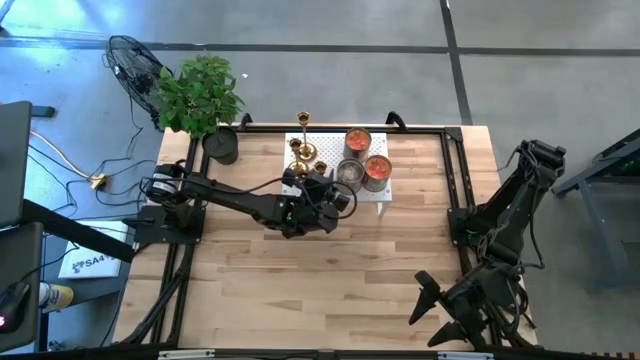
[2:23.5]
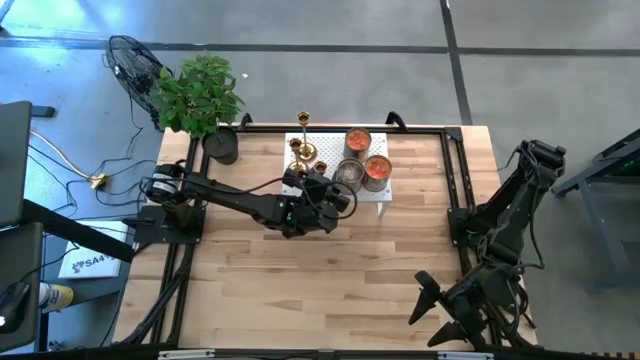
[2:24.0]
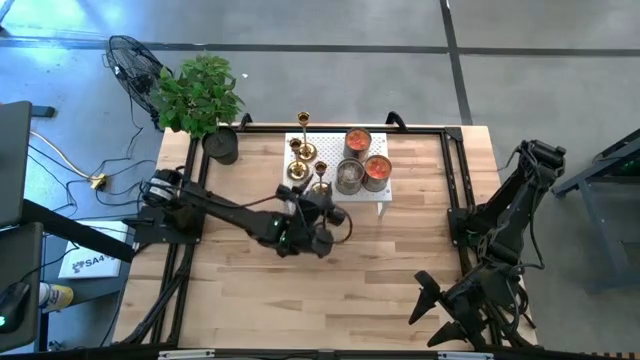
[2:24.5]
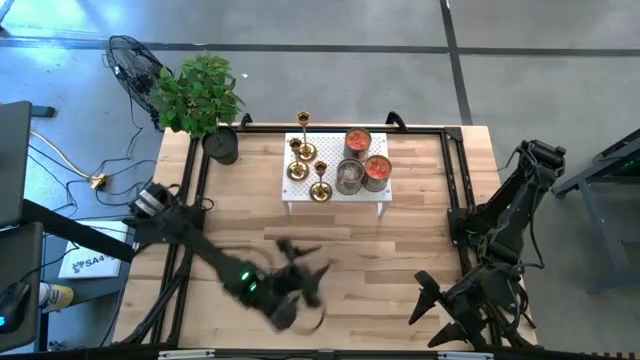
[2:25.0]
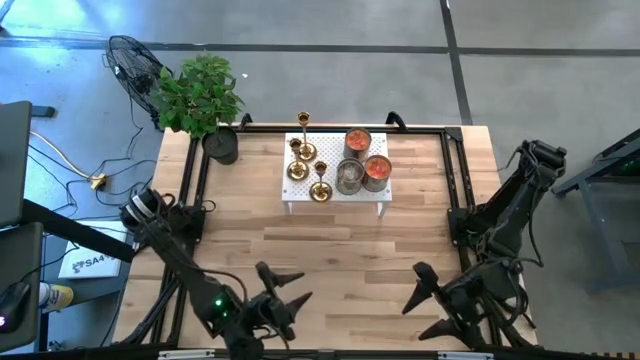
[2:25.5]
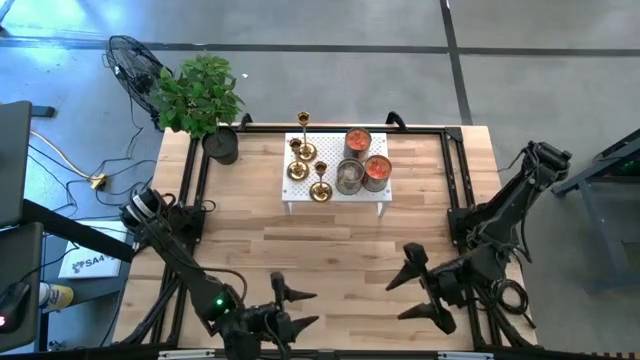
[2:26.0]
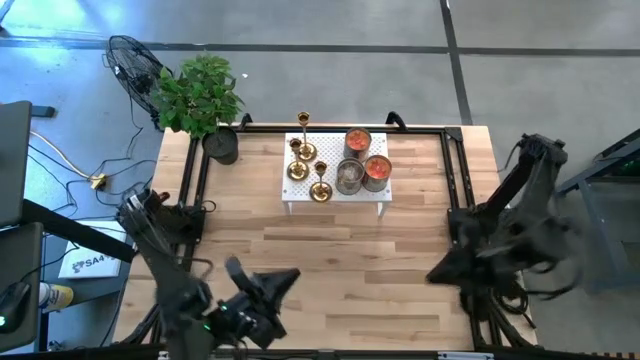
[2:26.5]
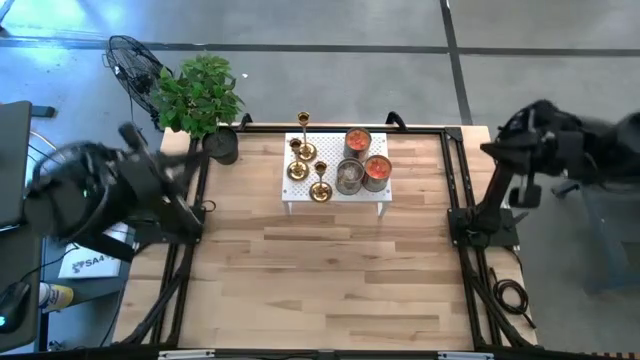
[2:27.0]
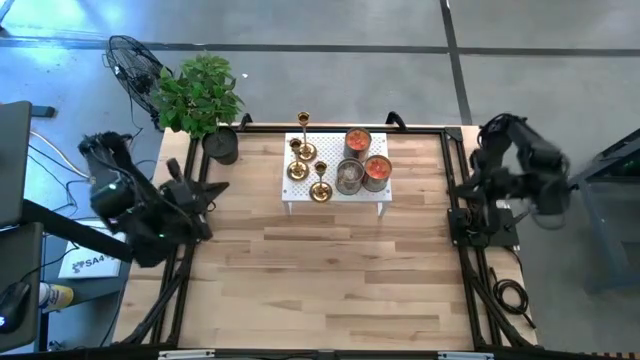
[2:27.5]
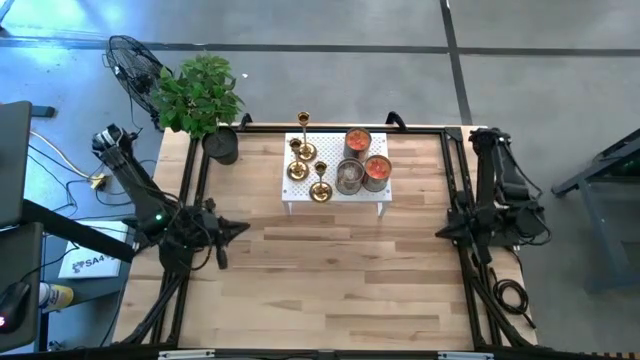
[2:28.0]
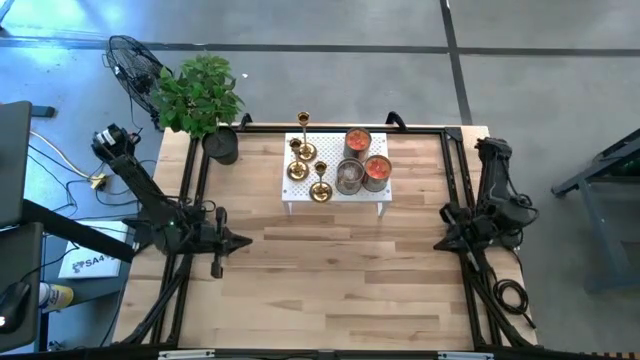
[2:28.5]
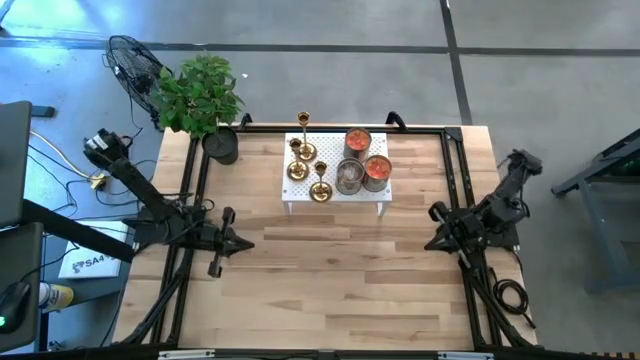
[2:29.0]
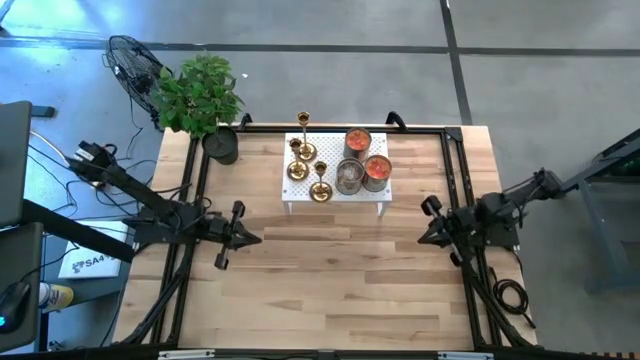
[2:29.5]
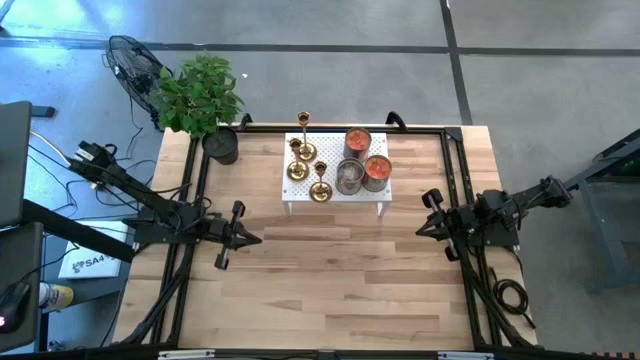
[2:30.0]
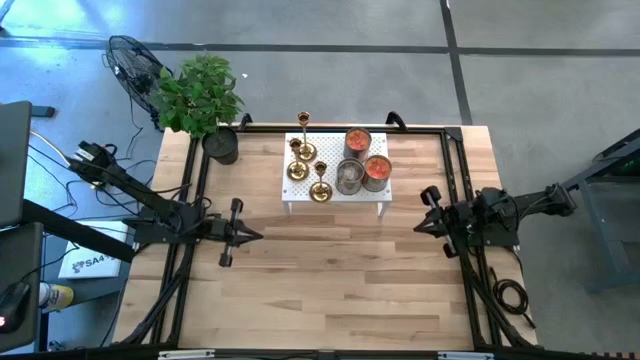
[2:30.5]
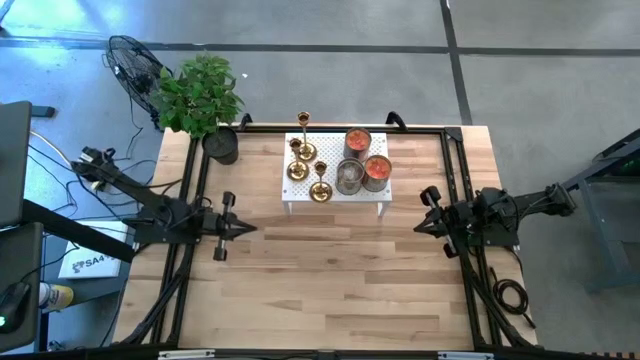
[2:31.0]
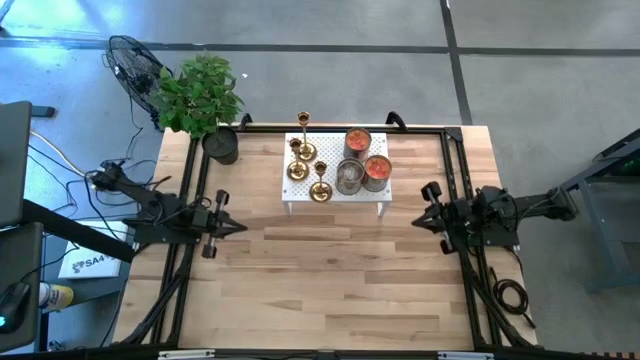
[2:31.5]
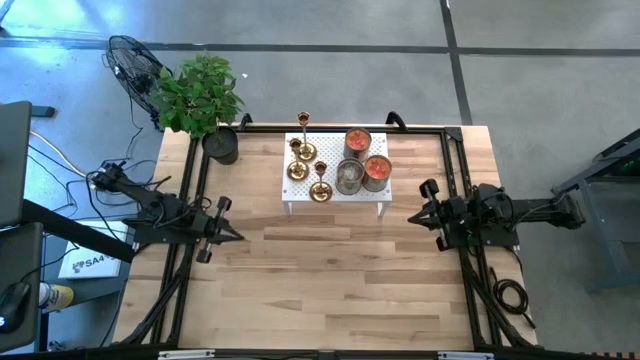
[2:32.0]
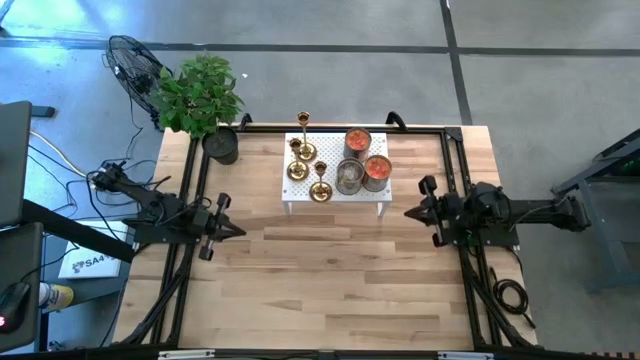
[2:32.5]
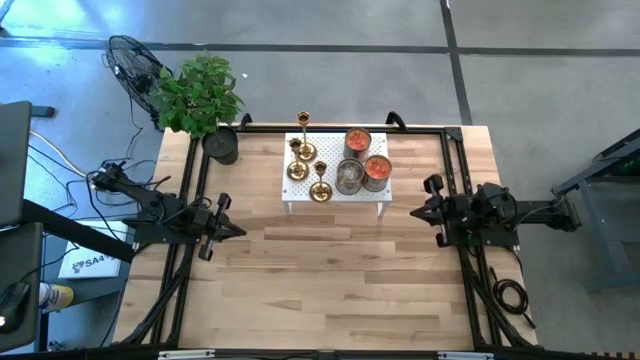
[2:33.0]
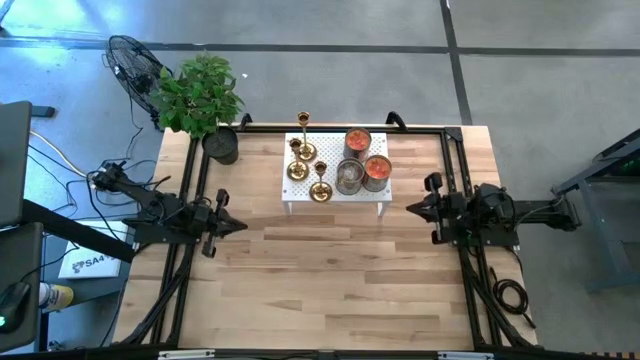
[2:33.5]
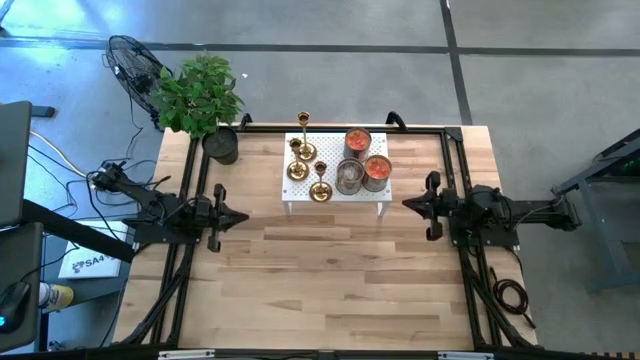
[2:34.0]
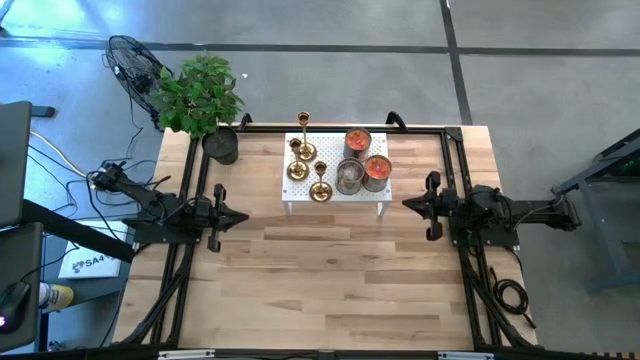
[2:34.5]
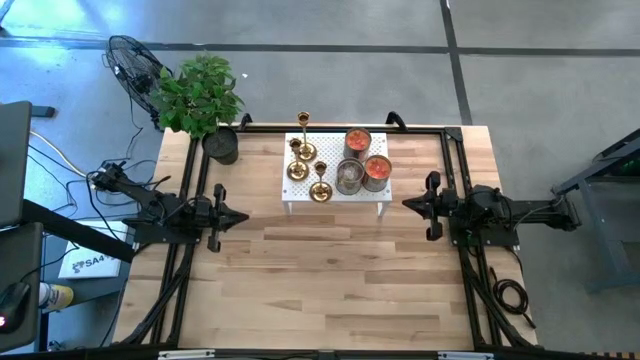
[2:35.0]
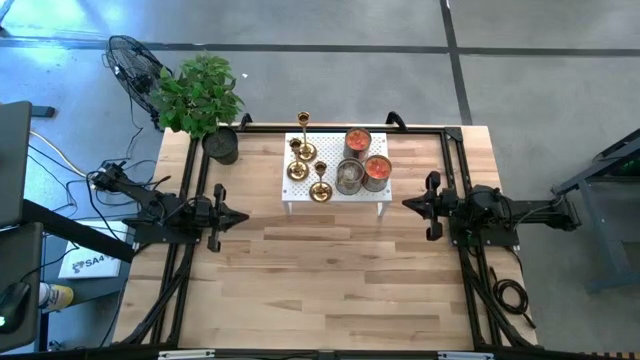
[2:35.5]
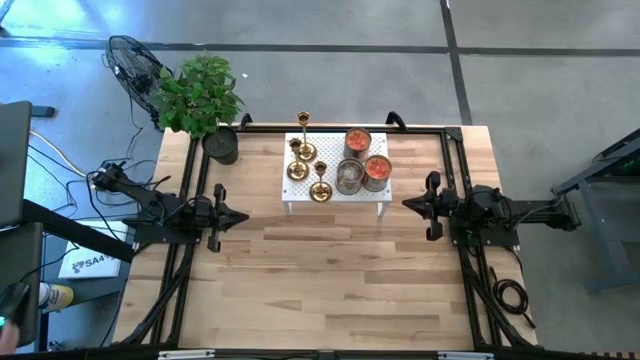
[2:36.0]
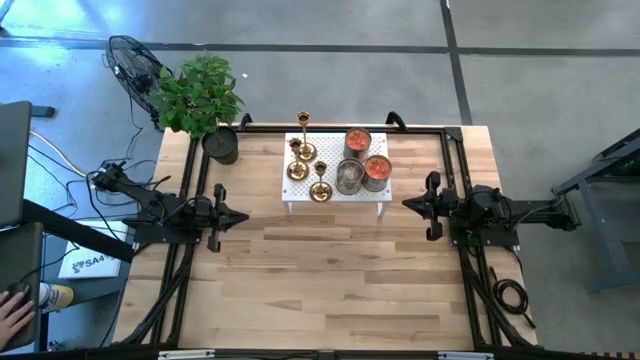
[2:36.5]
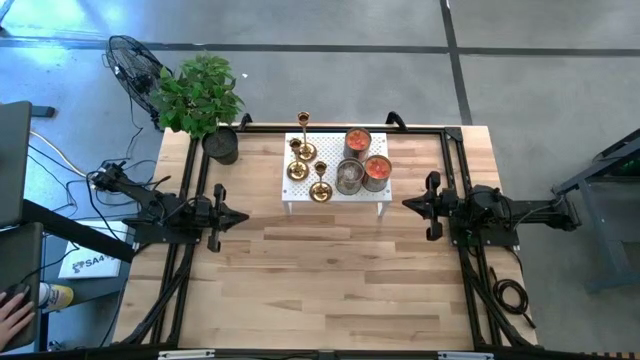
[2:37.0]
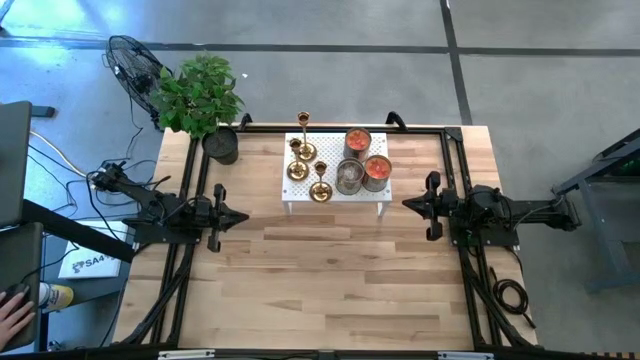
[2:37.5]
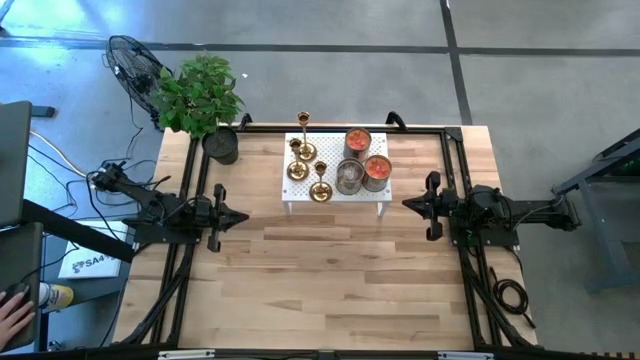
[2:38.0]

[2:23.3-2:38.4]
Task: Pick & Place candle stick holders
Return to Home Position

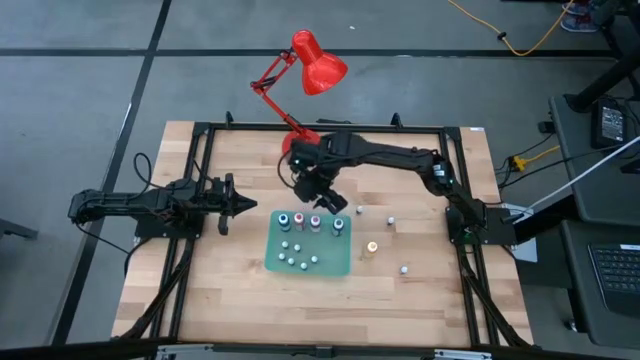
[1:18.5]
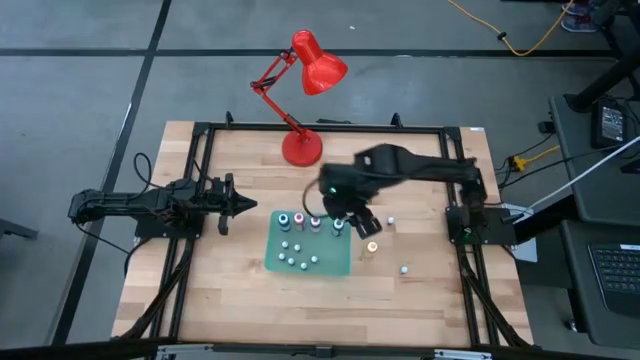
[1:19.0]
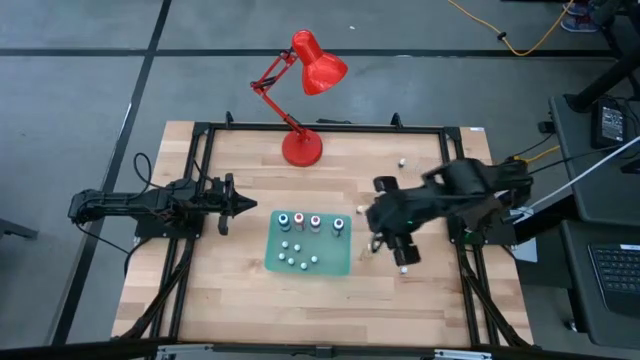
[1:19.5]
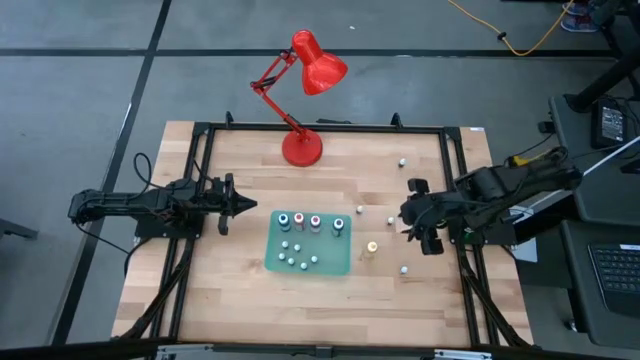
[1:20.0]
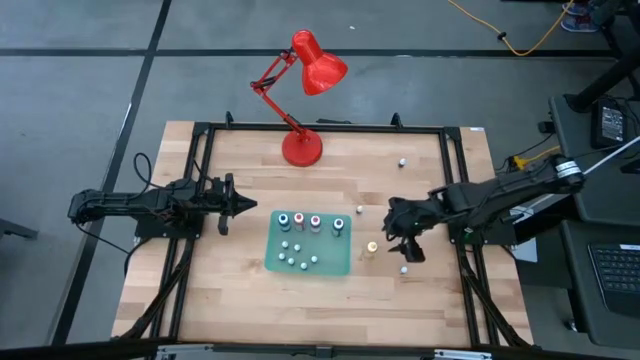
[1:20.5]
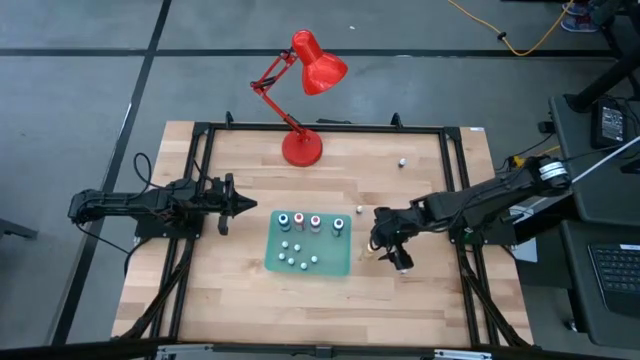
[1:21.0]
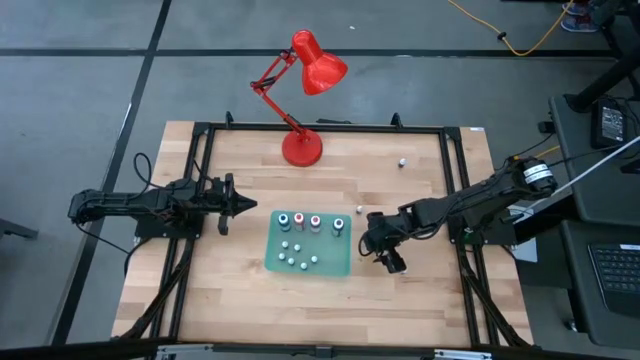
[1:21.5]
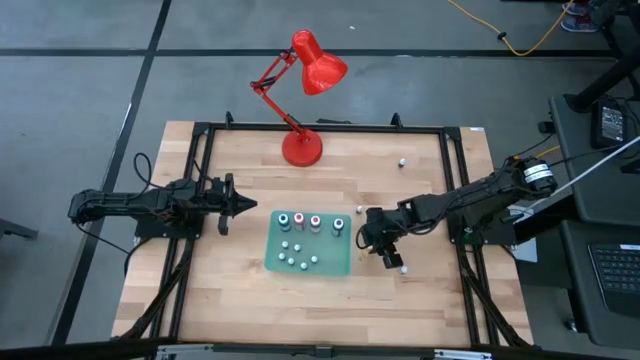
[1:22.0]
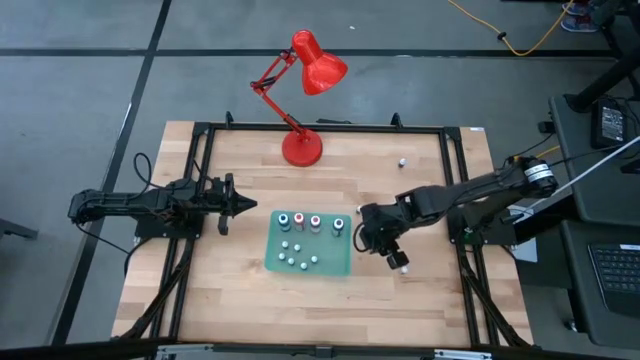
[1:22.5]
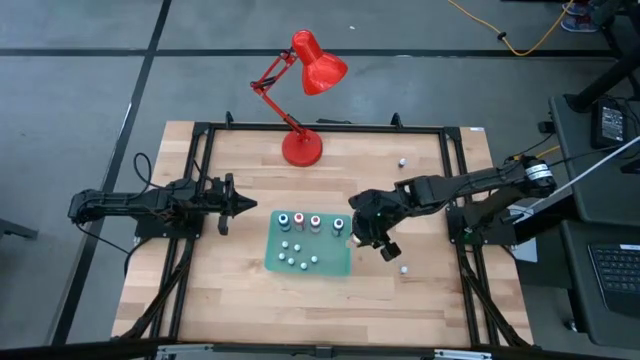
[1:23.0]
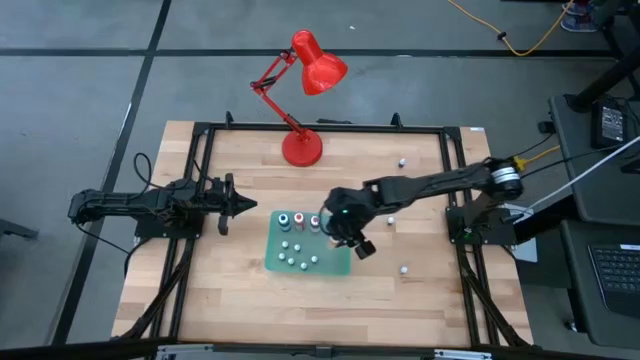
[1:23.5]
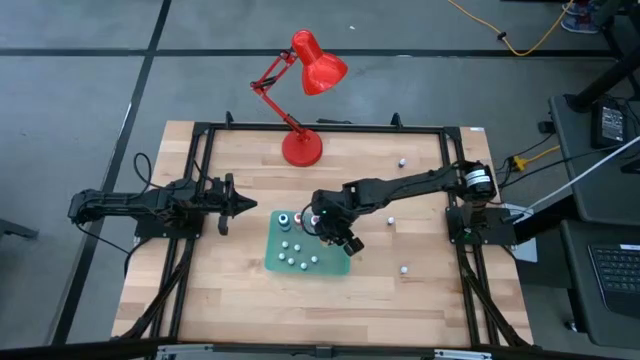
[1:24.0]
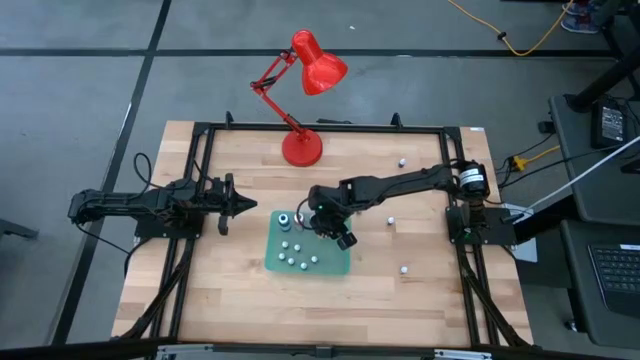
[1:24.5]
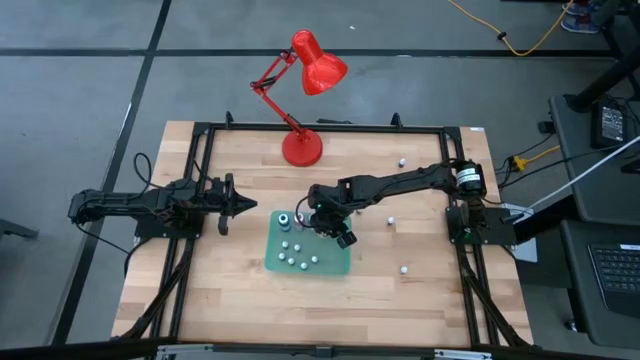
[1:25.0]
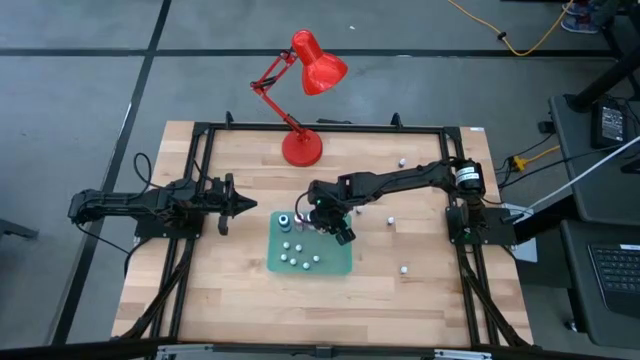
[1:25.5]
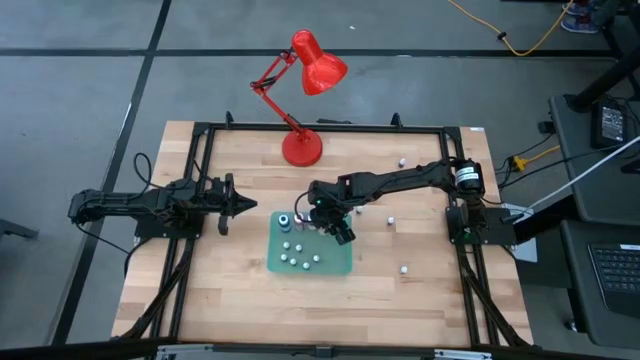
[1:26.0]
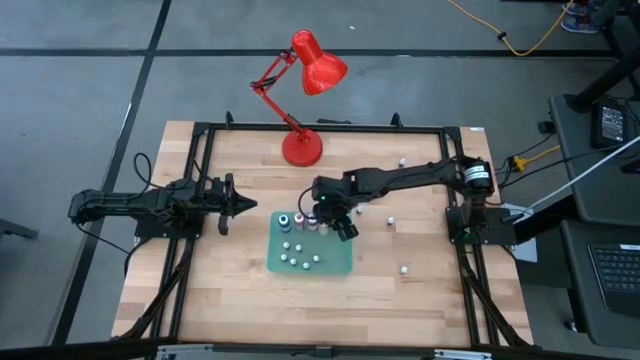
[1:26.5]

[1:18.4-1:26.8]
Task: Pick & Place food coloring
Put the large yellow bottle into the green bin
